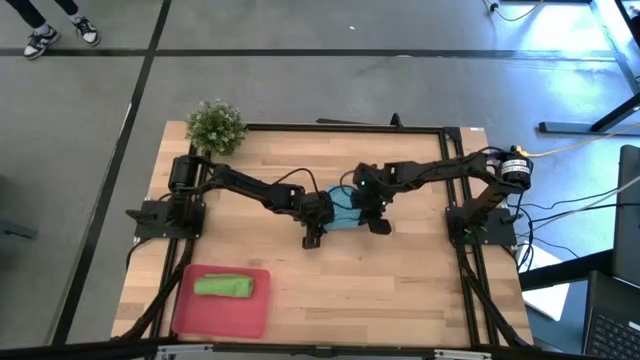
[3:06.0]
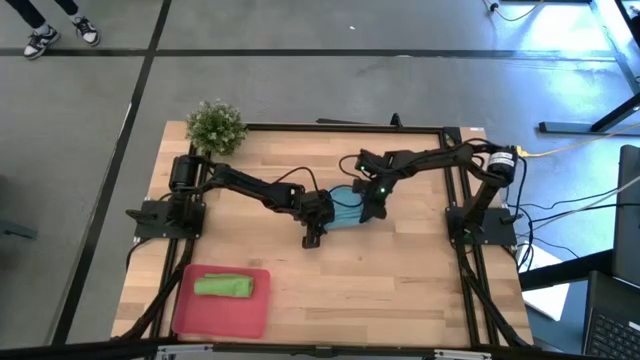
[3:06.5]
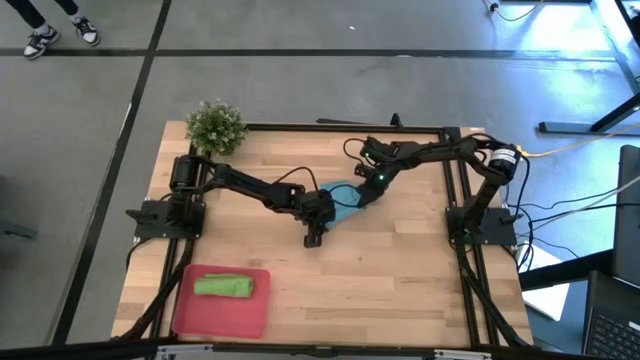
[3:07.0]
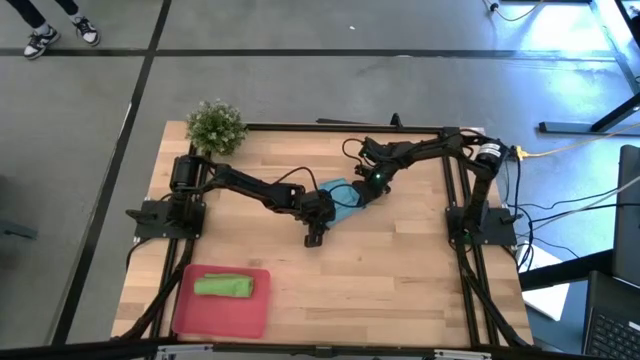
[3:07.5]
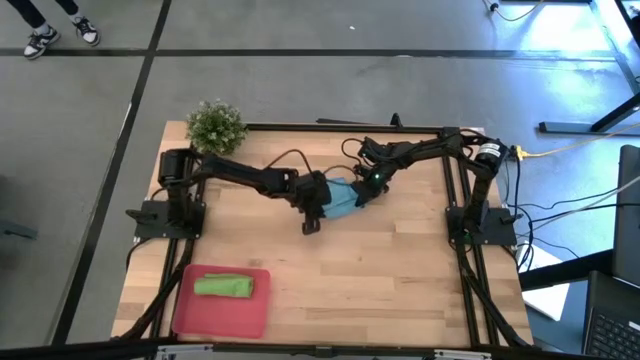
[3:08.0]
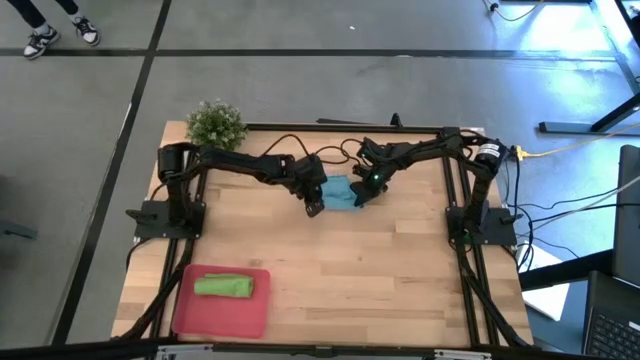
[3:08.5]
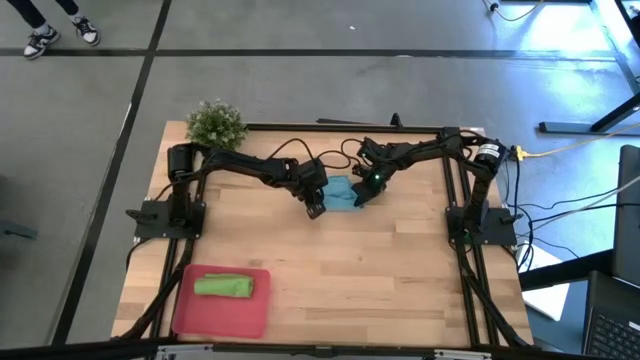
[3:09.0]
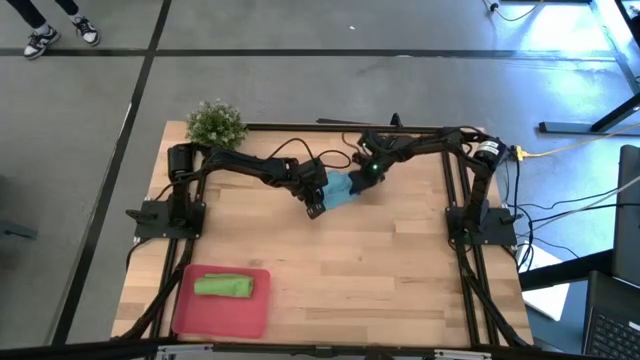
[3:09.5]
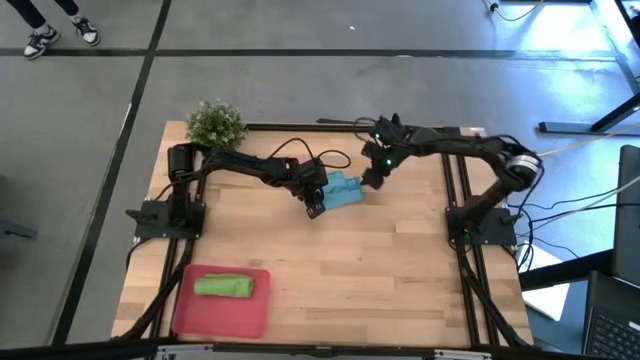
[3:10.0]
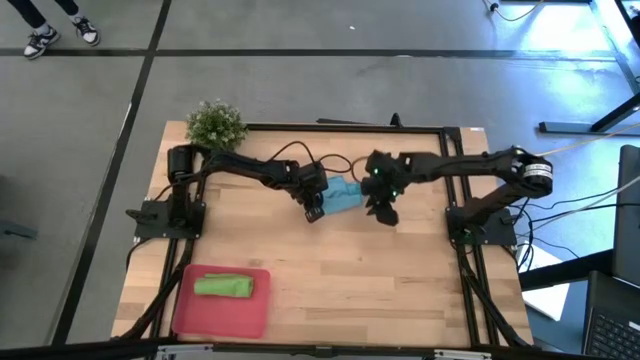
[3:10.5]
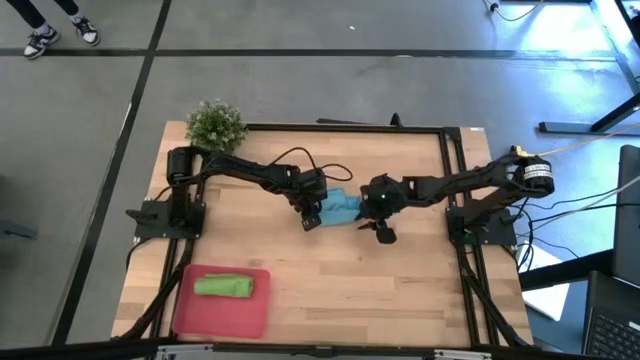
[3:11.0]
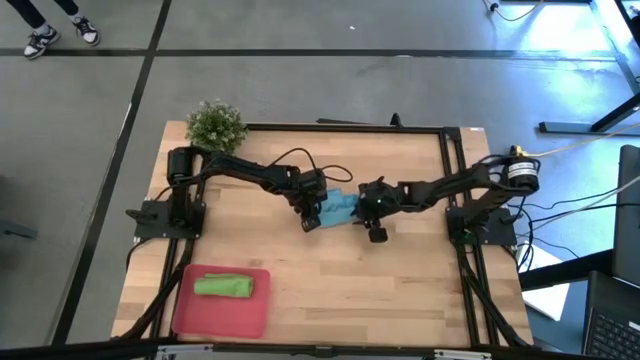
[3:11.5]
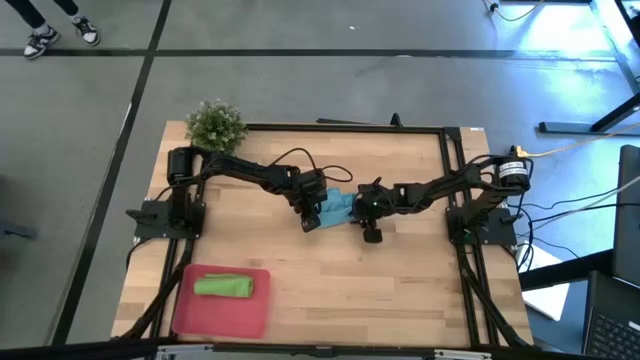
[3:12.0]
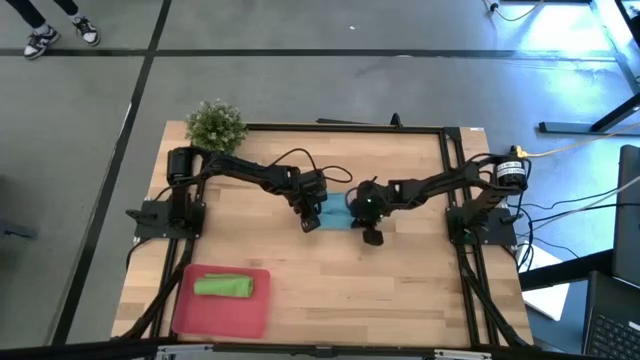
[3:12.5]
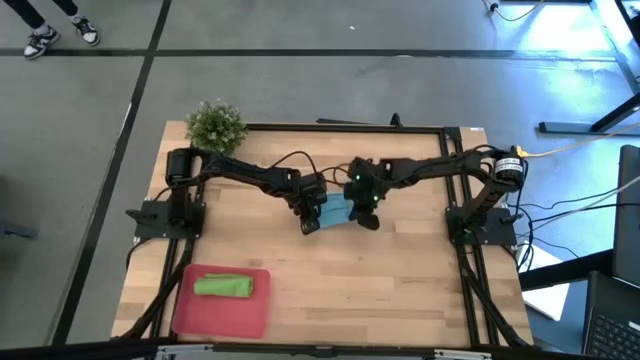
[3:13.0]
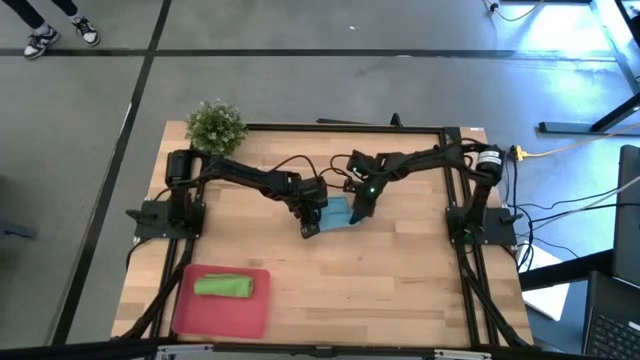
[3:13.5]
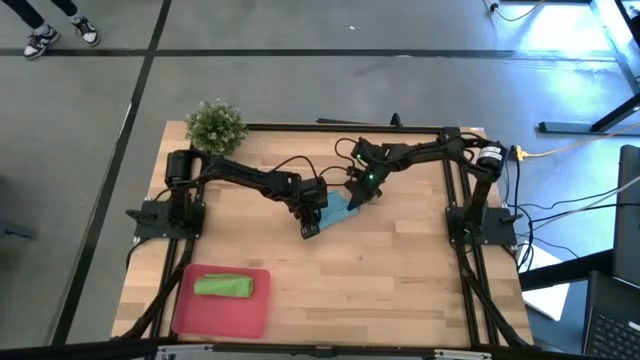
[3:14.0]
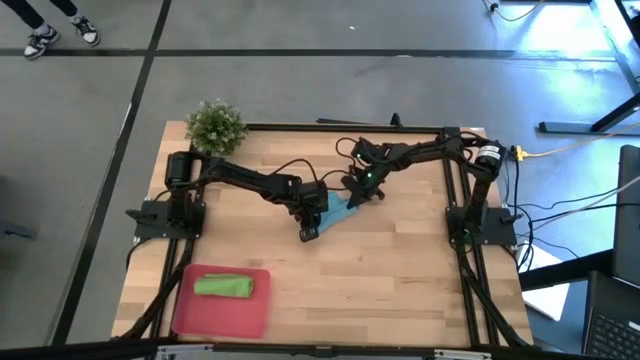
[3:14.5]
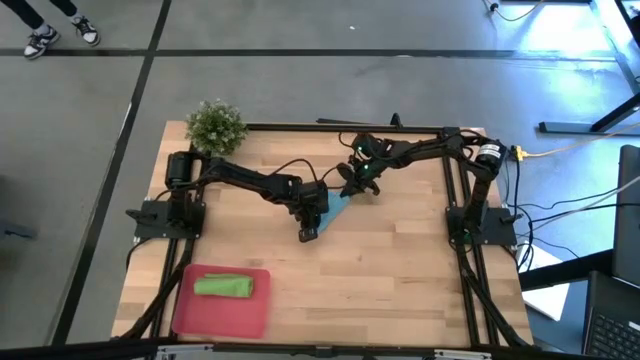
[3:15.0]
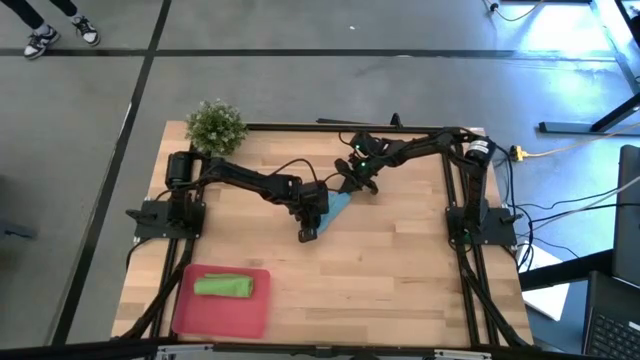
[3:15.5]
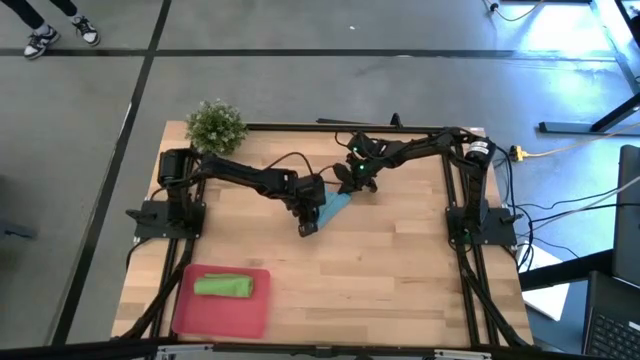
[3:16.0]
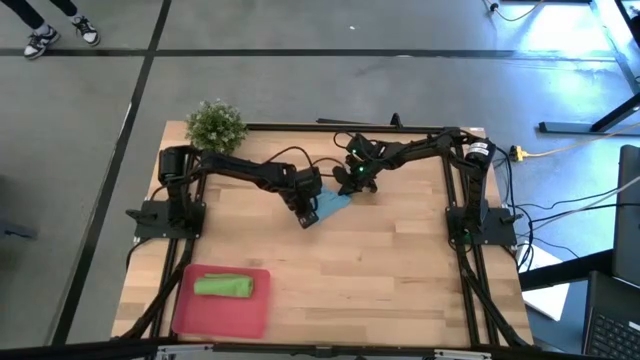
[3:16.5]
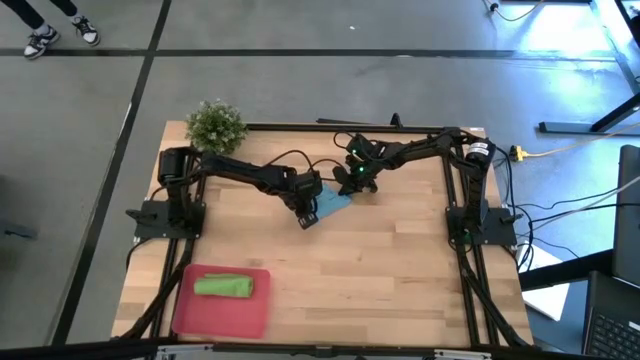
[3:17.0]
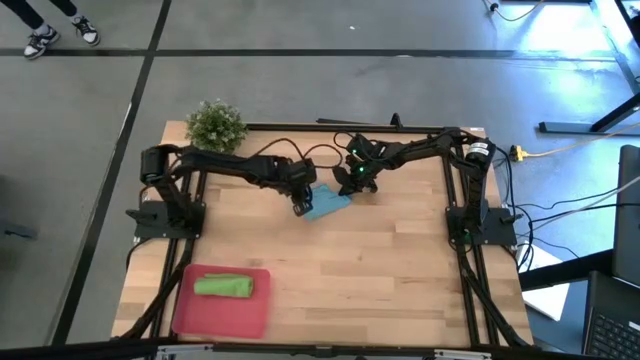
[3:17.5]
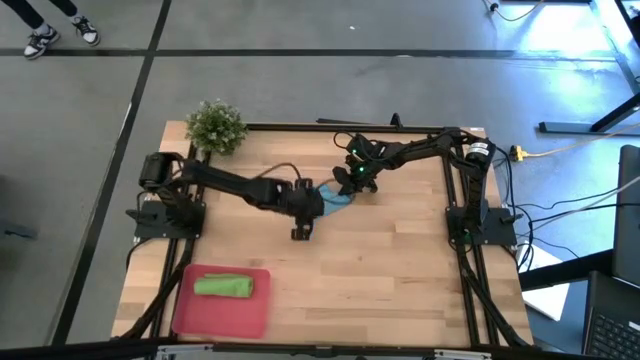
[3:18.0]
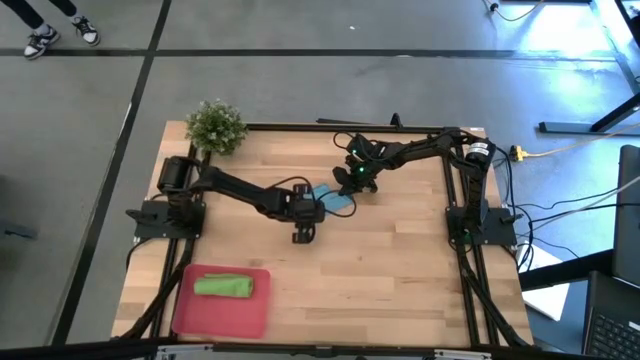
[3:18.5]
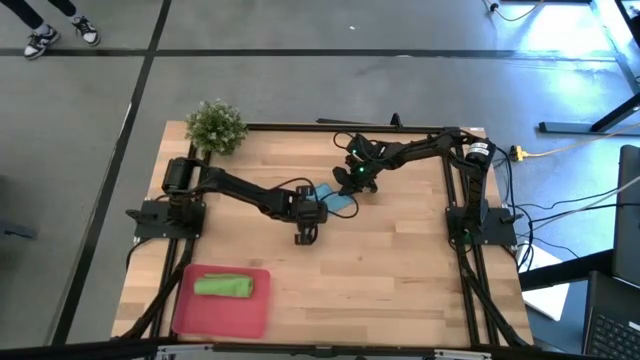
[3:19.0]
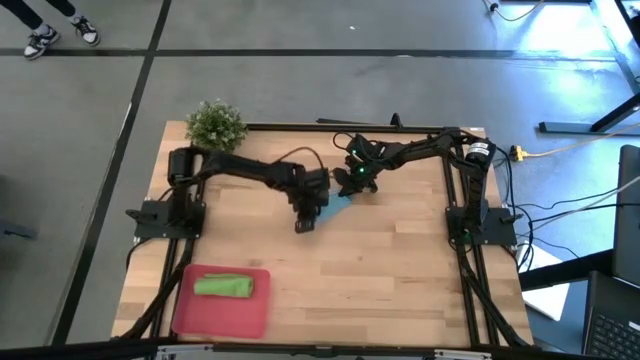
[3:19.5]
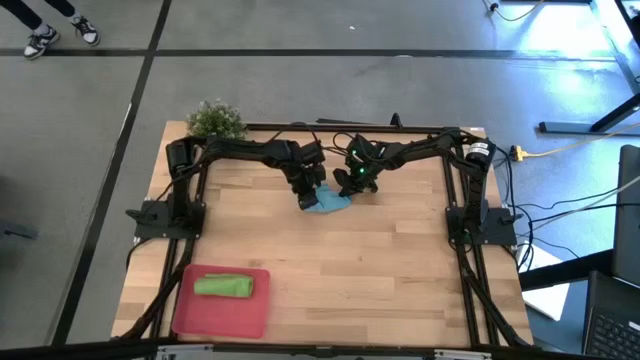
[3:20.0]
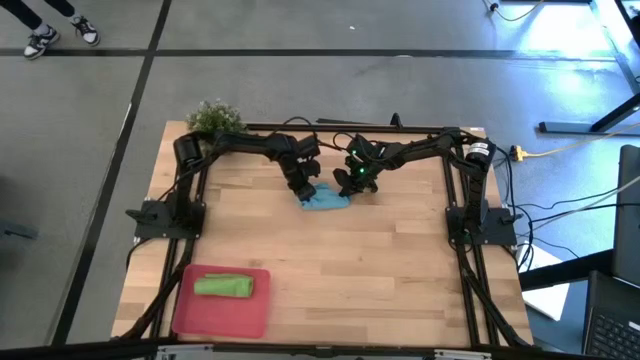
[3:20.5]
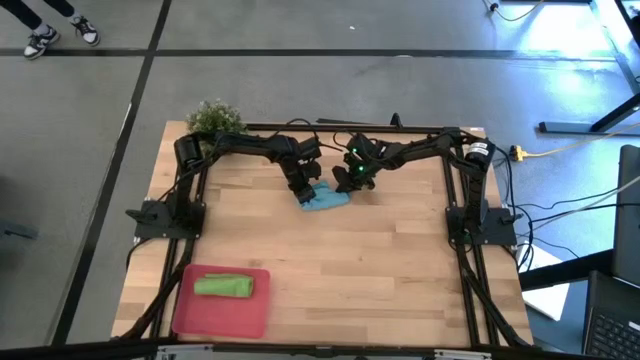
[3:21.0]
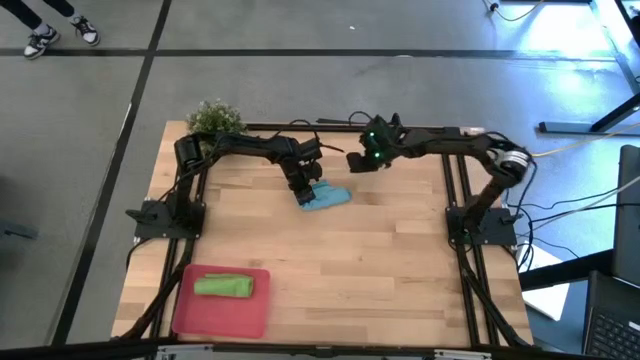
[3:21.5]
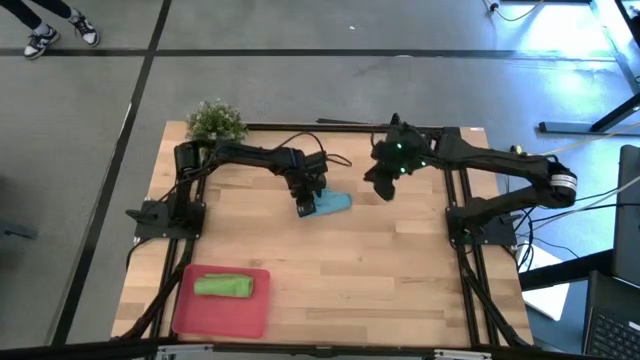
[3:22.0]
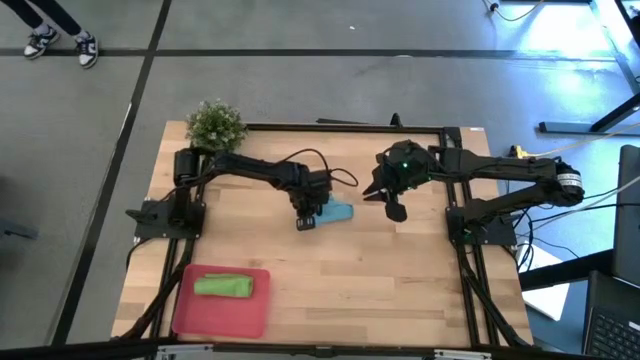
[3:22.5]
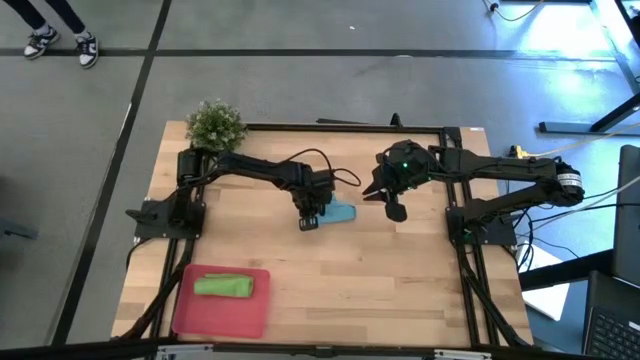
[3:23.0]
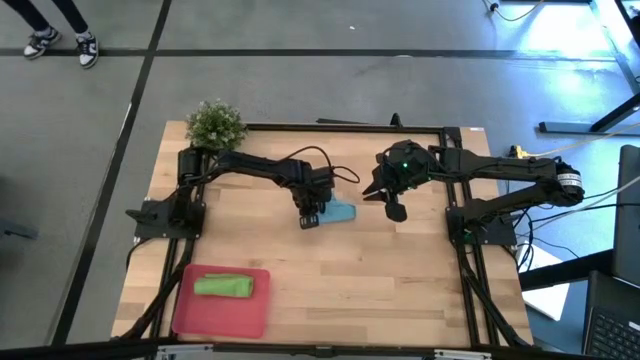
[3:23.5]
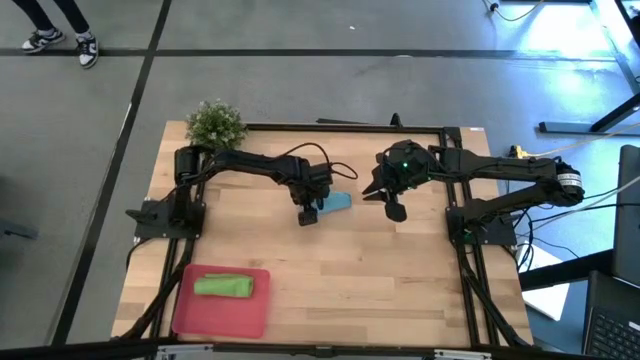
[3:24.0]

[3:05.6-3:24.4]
Task: Roll microfiber towels into tight, uniform cylinder then place into a basket
Roll the microfiber blue towel
